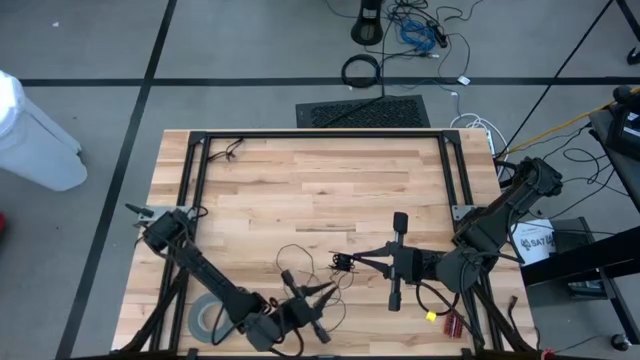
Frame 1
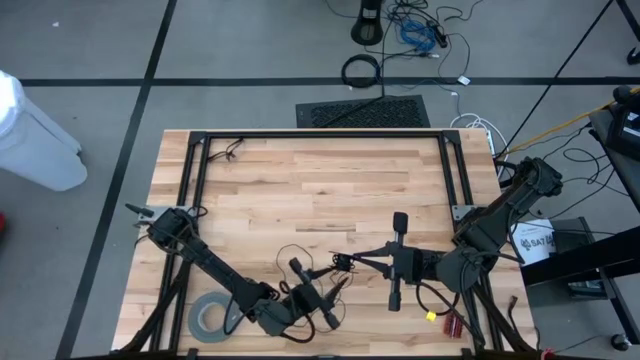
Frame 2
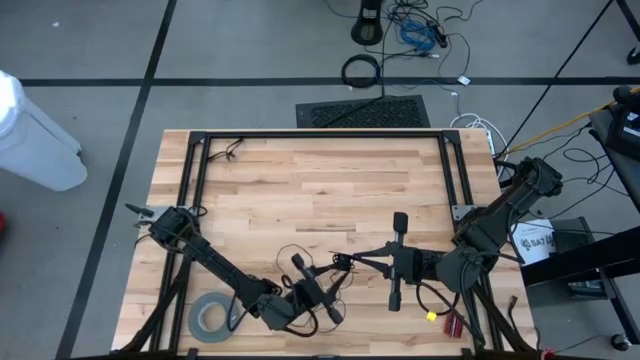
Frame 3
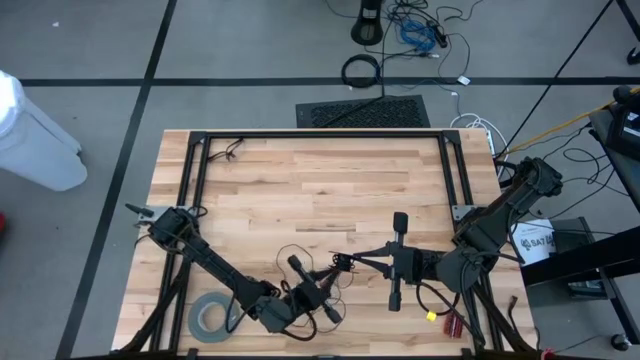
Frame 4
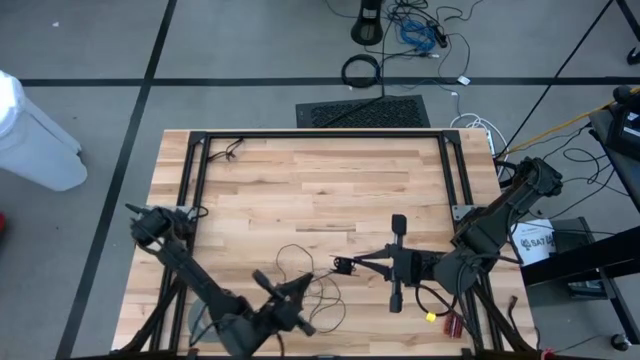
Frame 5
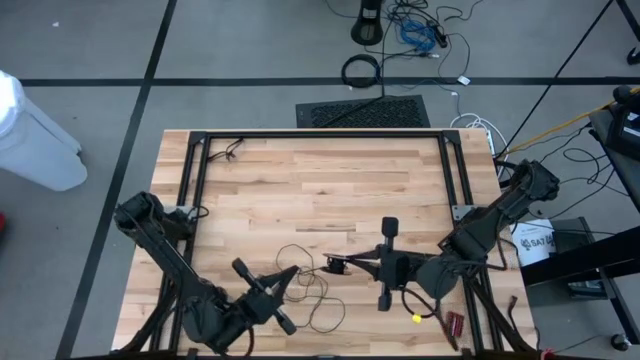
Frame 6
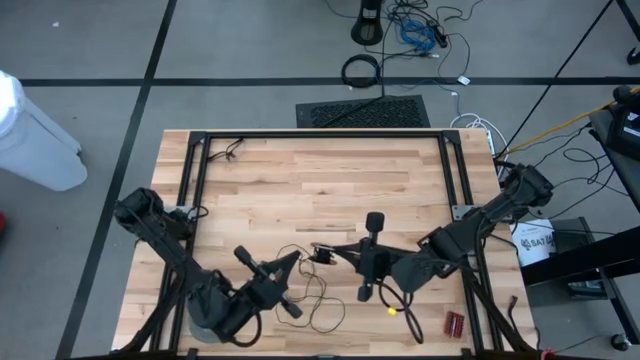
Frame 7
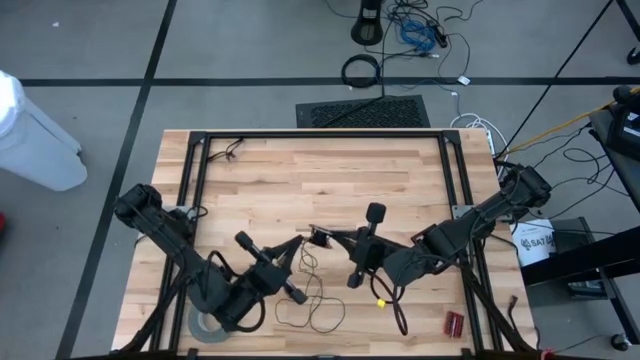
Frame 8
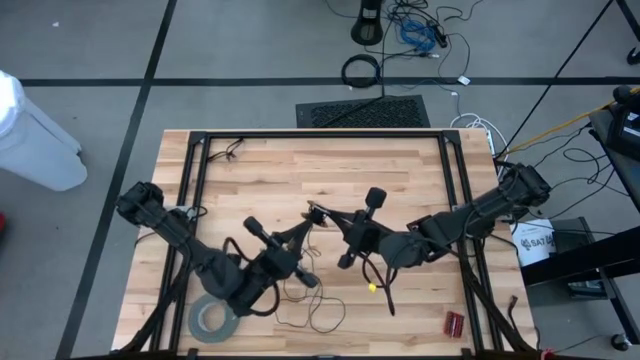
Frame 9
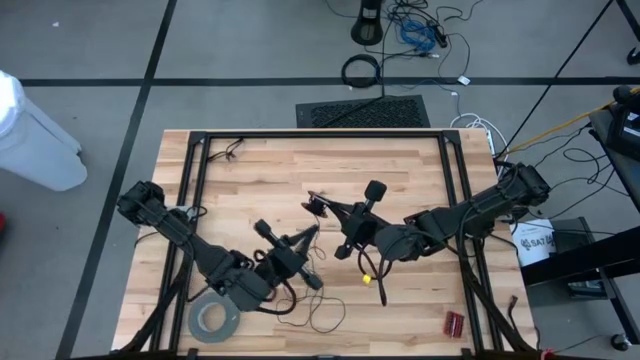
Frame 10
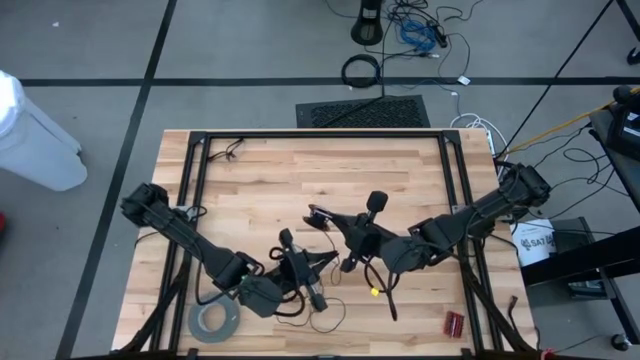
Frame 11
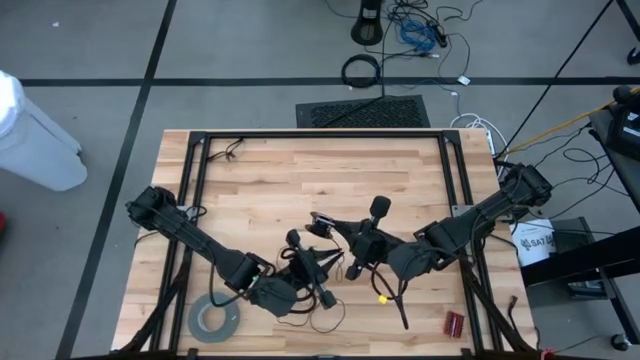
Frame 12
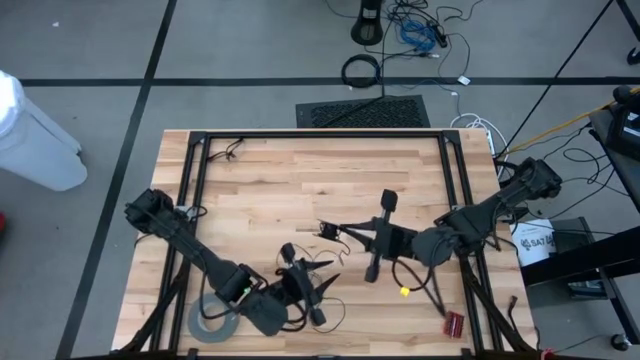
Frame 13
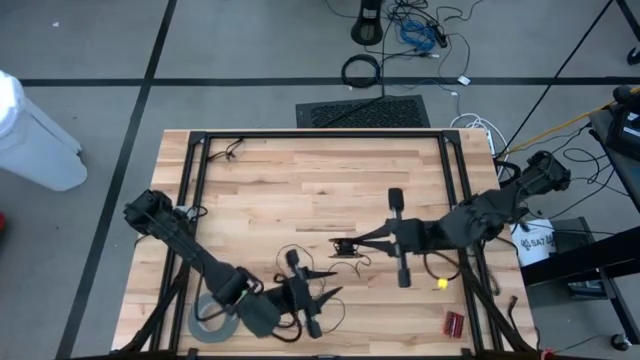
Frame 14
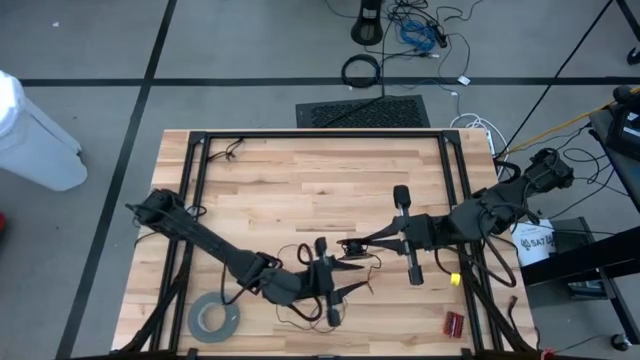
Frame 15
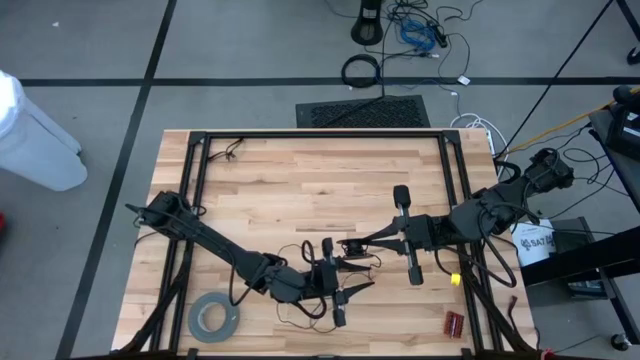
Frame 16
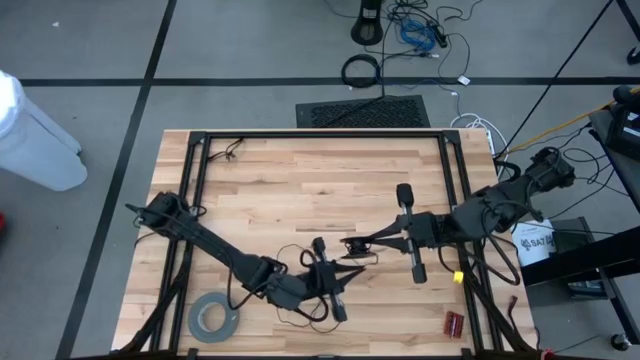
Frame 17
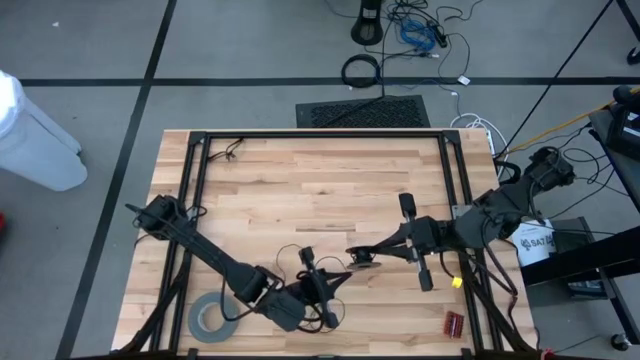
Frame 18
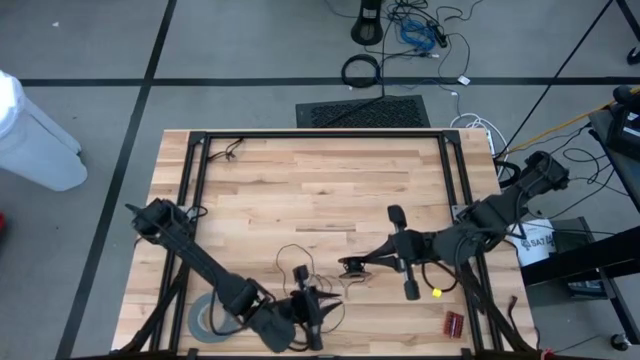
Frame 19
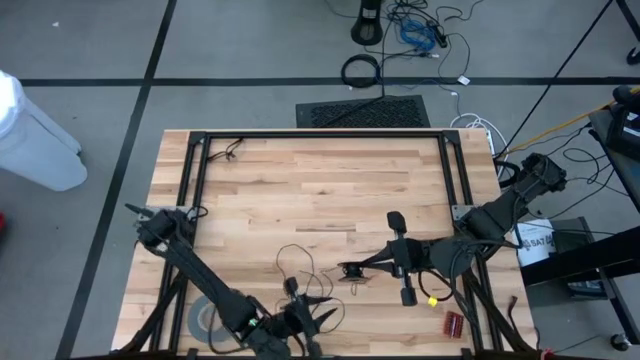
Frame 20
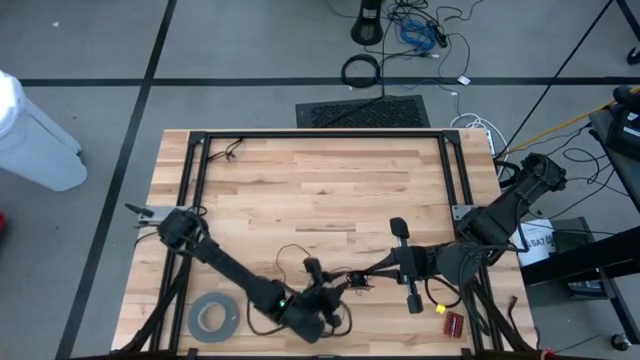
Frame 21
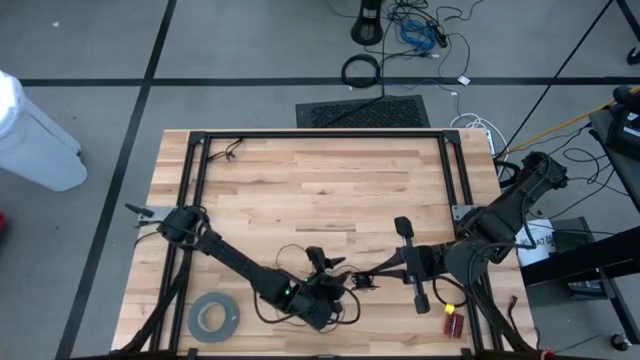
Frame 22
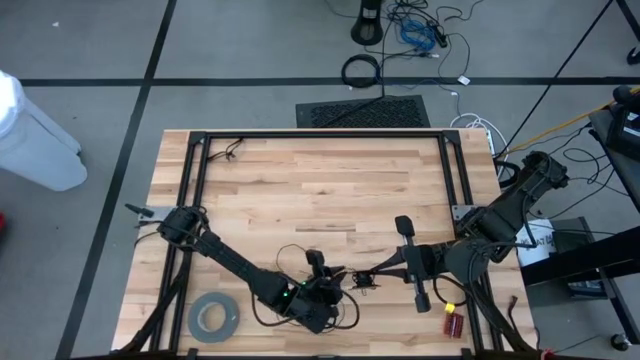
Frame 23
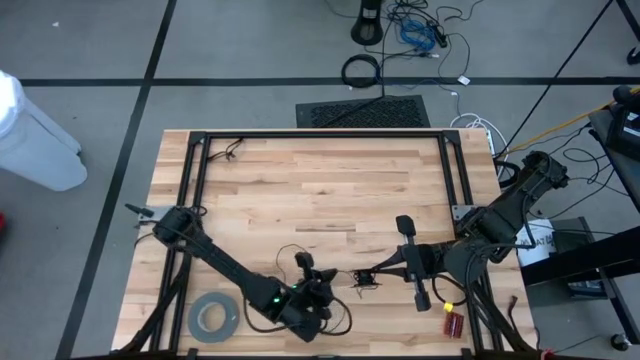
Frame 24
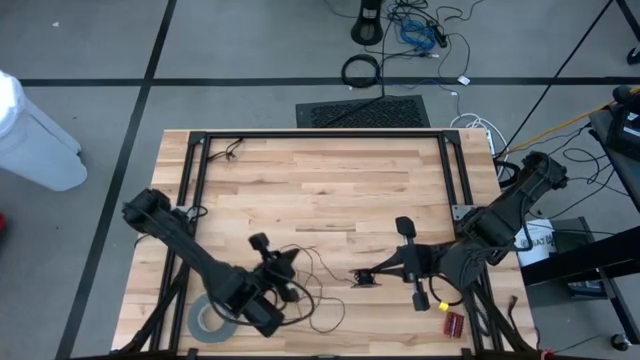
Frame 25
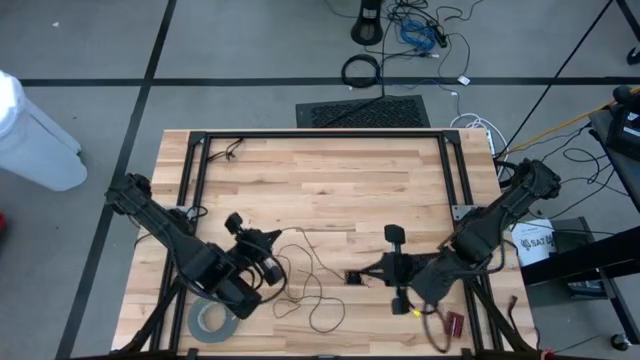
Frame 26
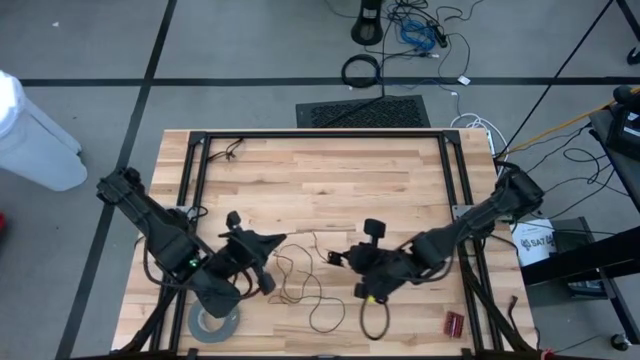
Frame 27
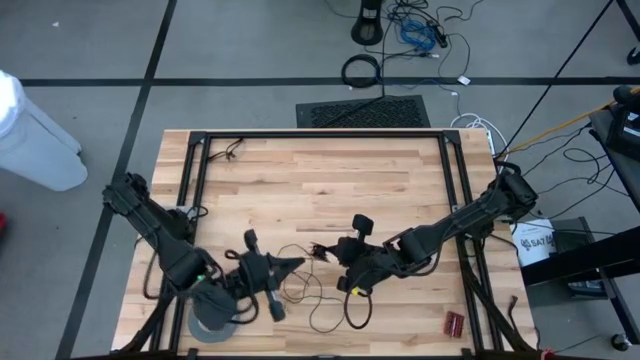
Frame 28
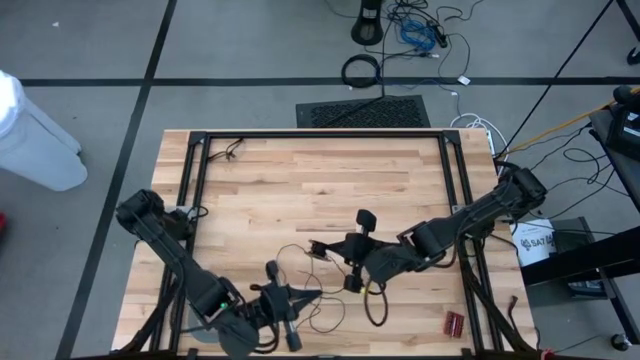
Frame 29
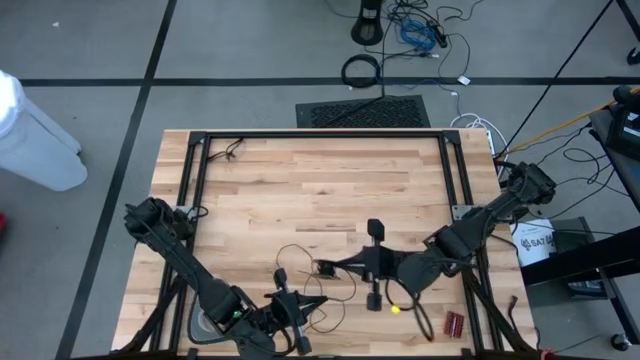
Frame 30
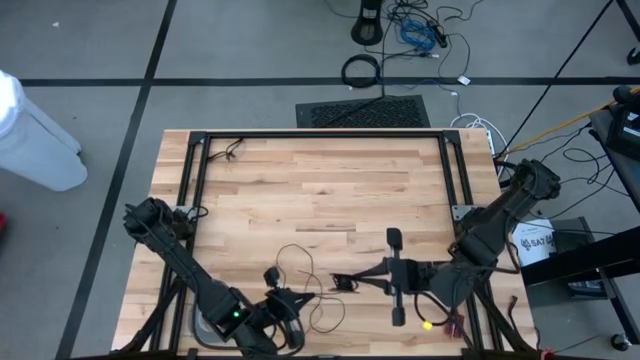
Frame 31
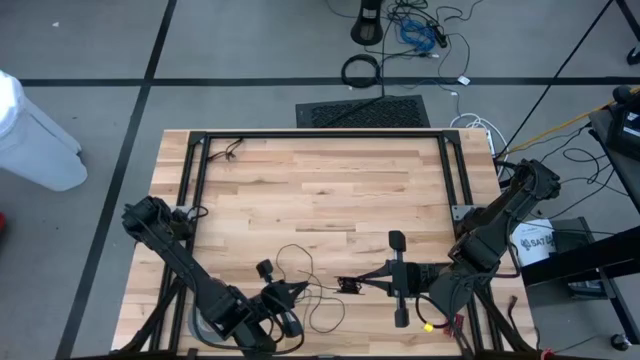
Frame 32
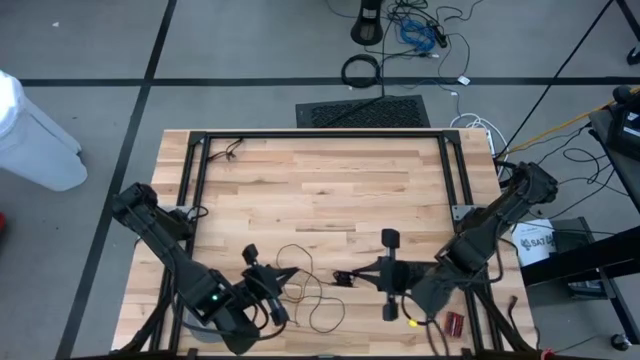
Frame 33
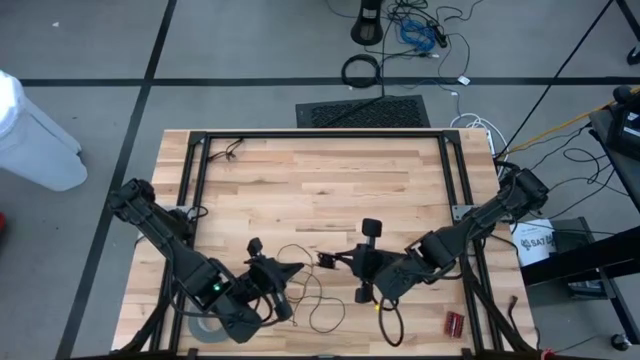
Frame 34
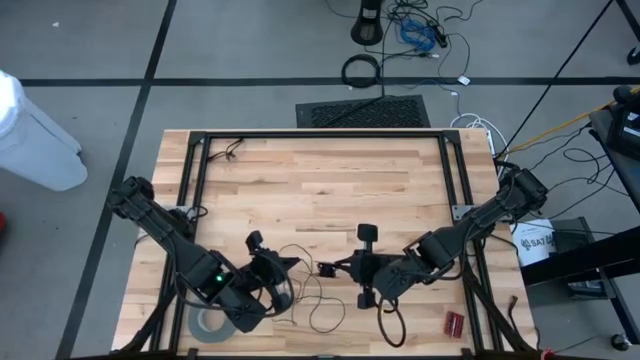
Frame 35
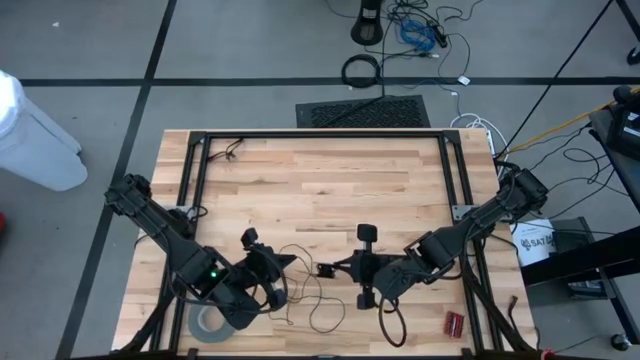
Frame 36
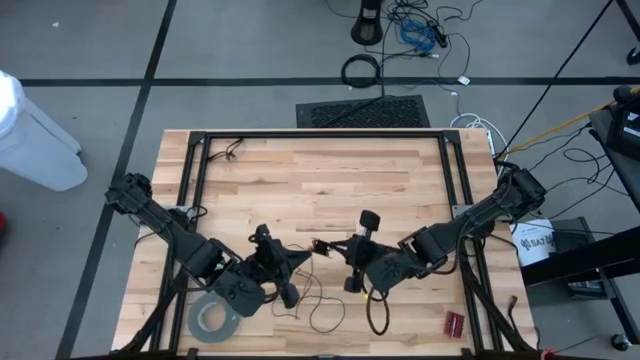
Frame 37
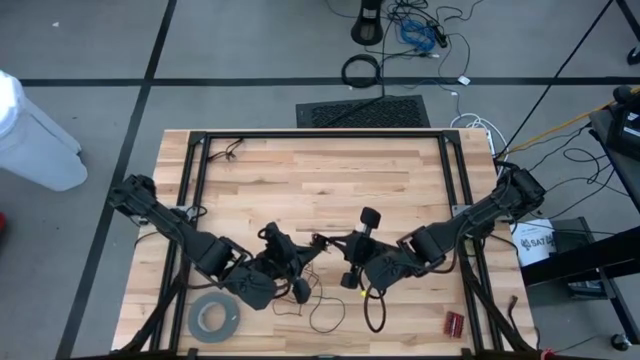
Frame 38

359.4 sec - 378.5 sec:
Task: Coil cords
Coil the black wire onto the spool
